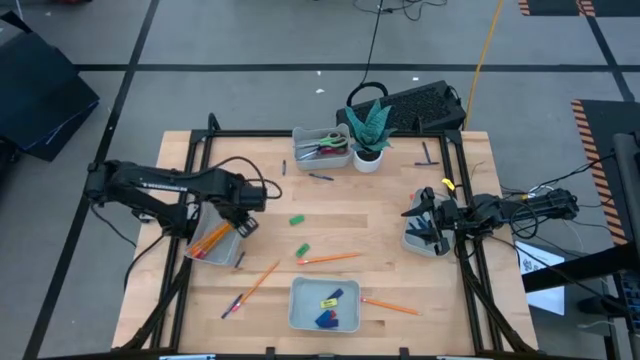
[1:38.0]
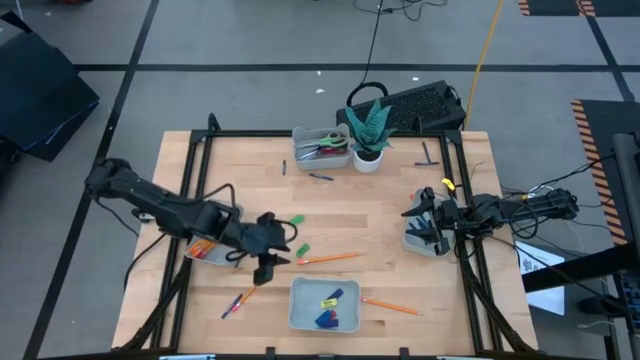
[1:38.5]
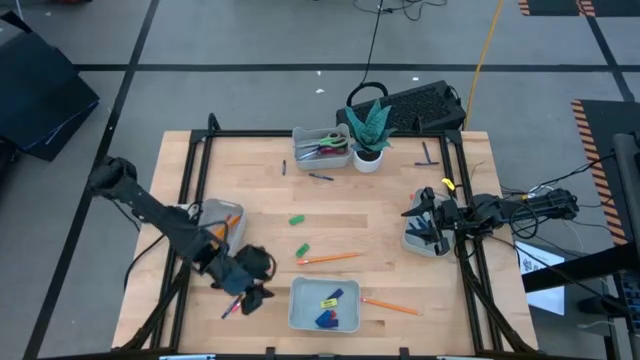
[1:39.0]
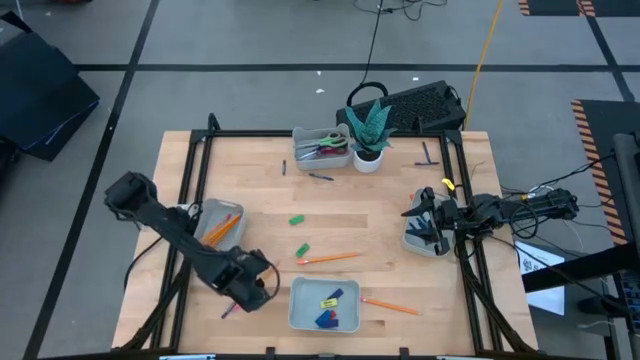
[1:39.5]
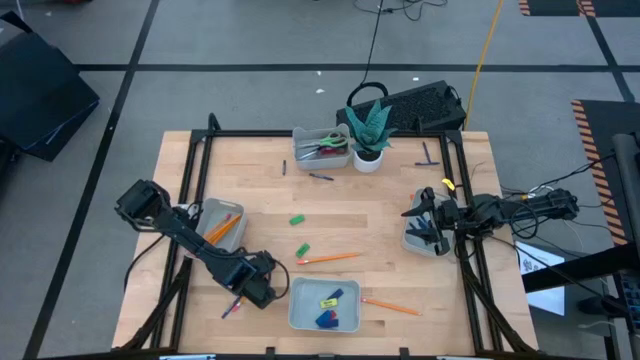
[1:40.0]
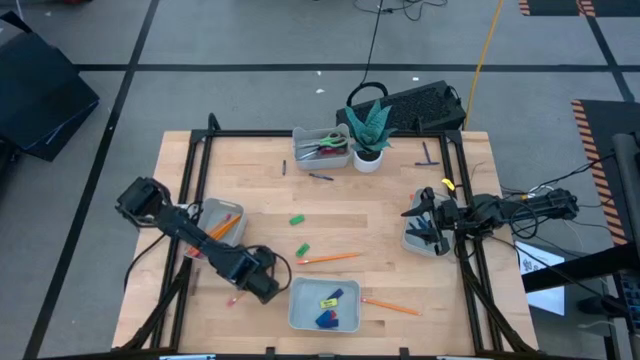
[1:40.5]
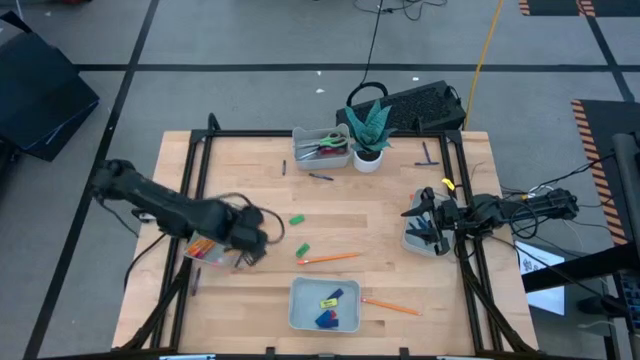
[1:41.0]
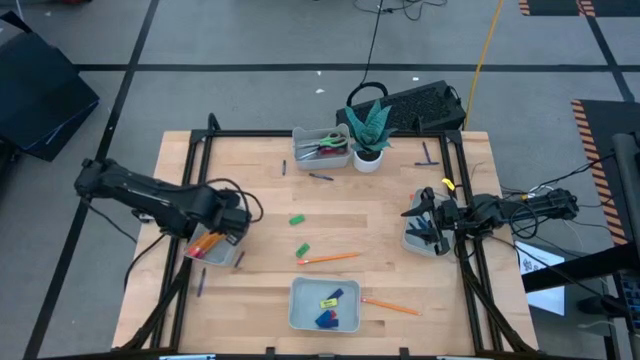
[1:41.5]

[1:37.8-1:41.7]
Task: Sort crayons/erasers/pens/pencils in bins
Put the orange pencil into the middle left gray bin

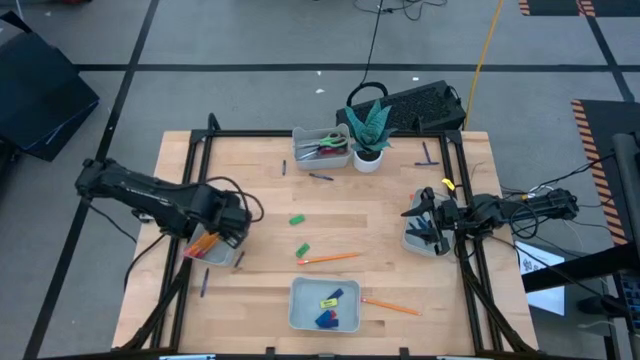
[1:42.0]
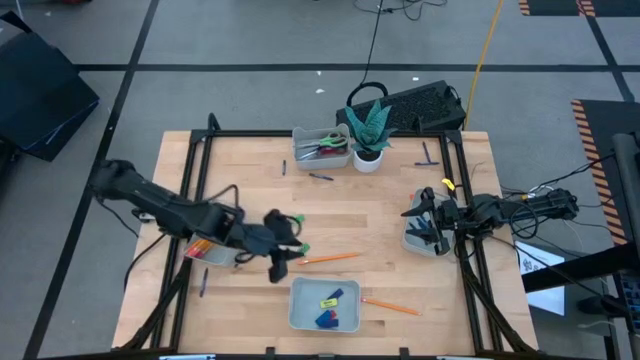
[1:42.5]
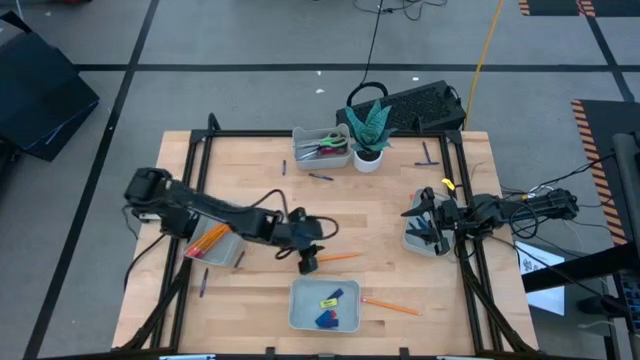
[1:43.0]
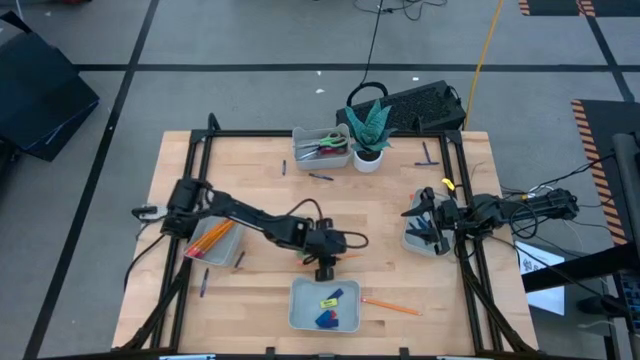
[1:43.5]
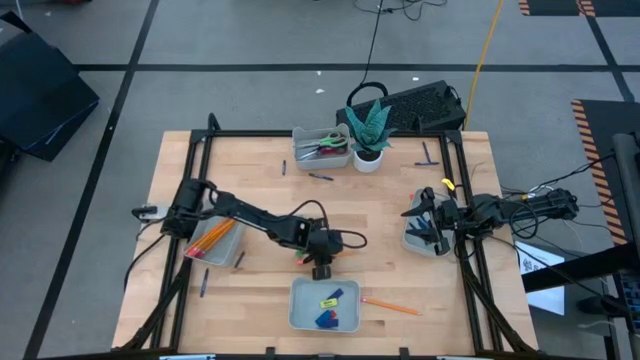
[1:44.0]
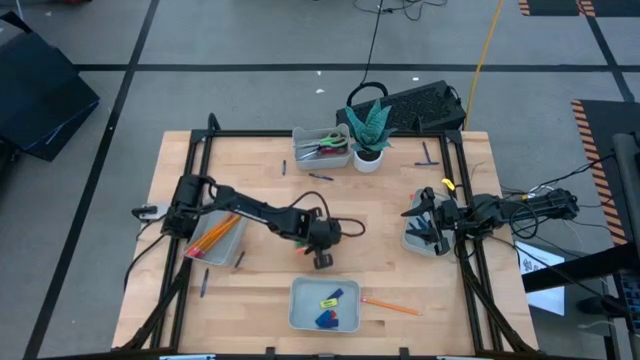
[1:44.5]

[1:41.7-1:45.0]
Put the orange pencil into the middle left gray bin

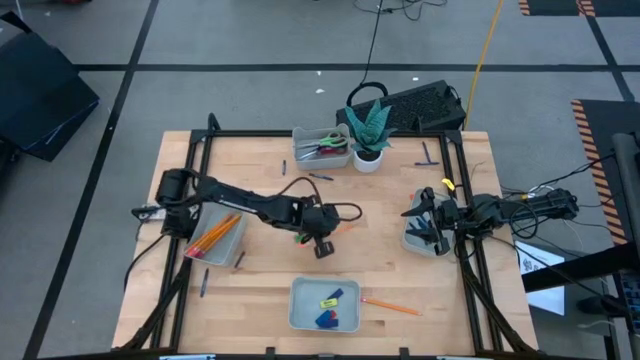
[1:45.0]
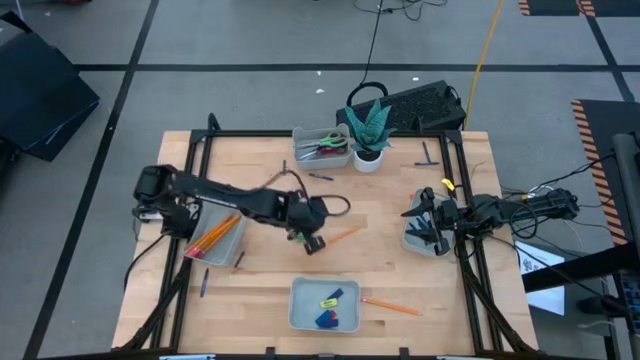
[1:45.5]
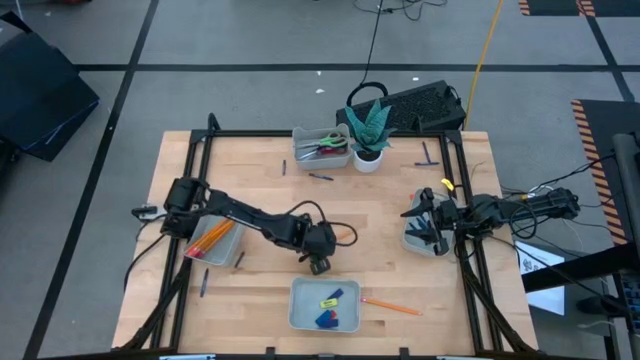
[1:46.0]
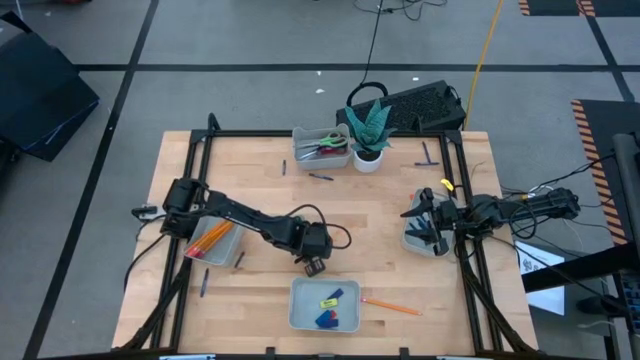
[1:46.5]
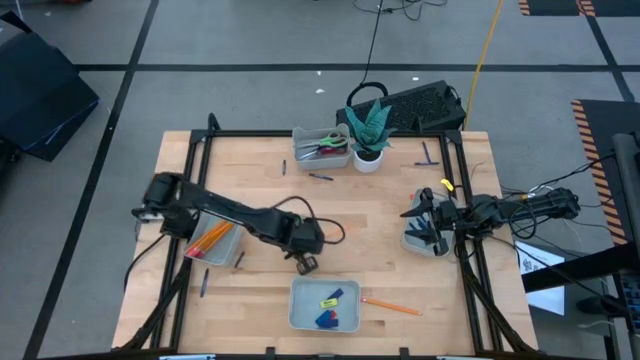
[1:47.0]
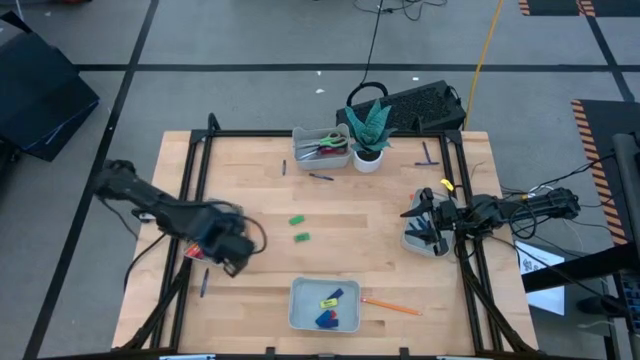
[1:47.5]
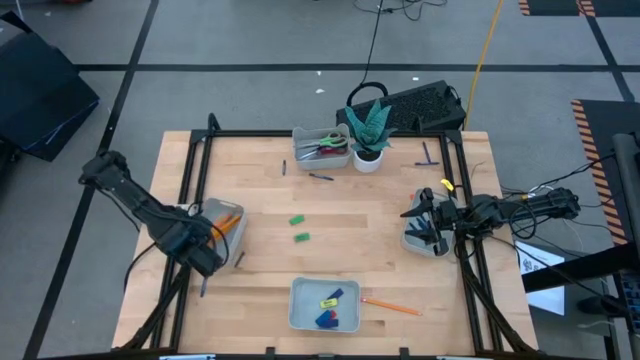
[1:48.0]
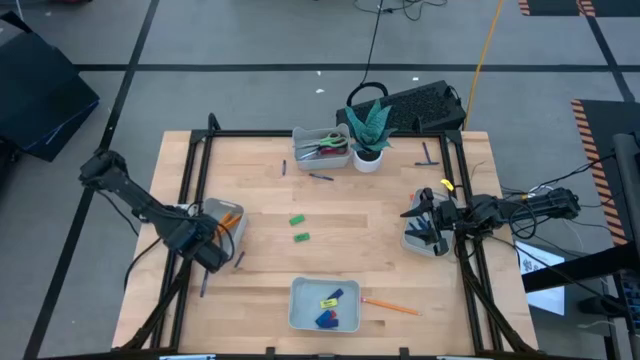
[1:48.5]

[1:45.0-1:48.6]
Put the orange pencil into the middle left gray bin

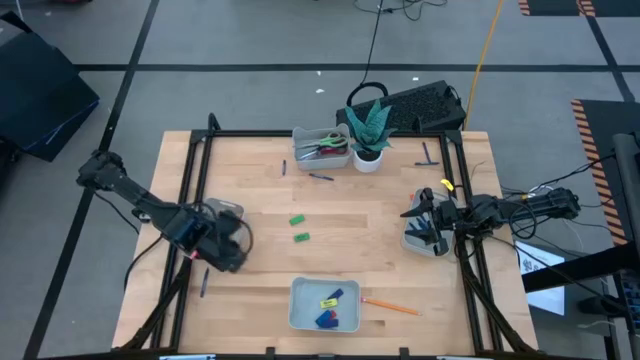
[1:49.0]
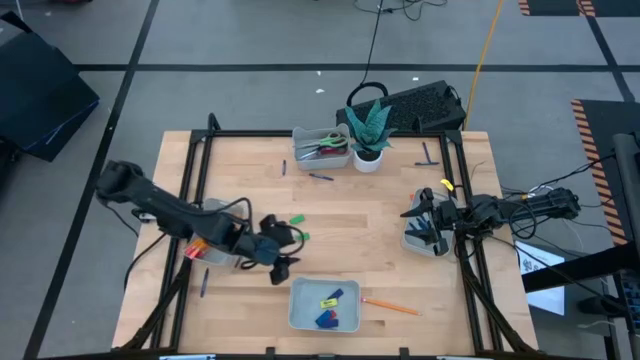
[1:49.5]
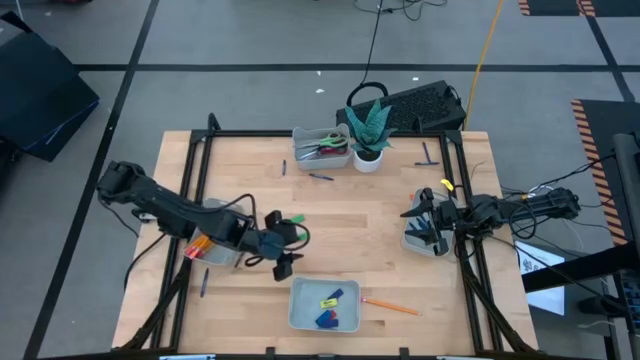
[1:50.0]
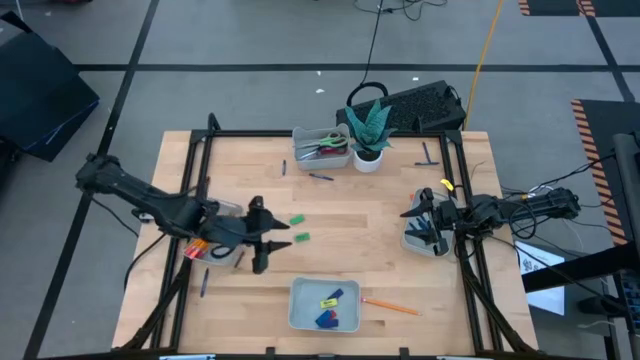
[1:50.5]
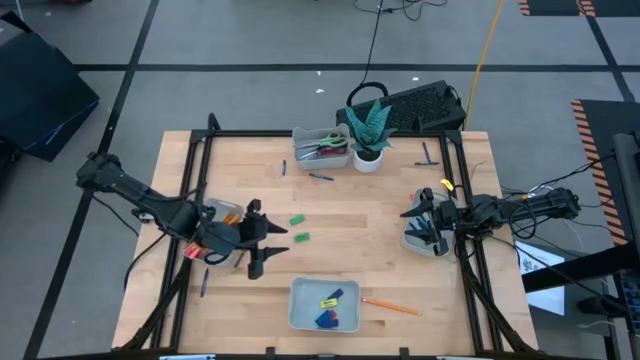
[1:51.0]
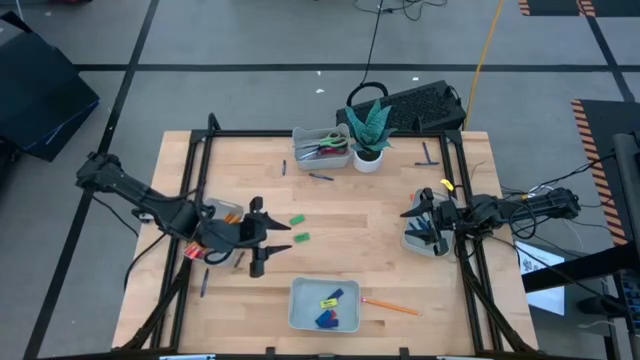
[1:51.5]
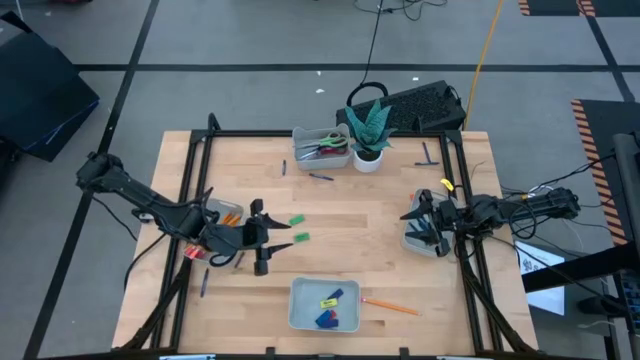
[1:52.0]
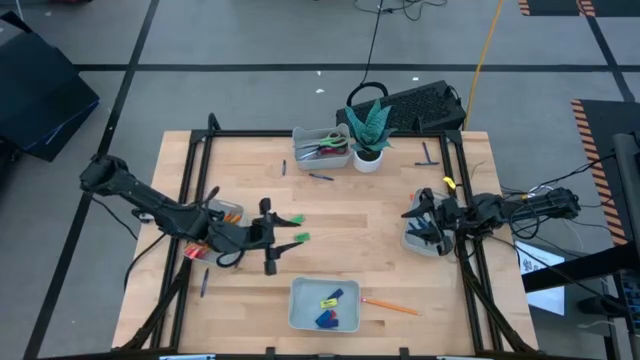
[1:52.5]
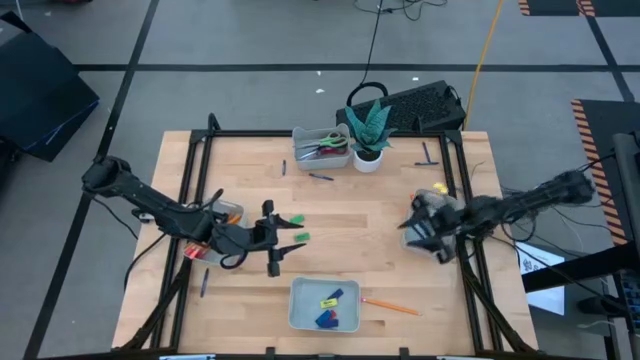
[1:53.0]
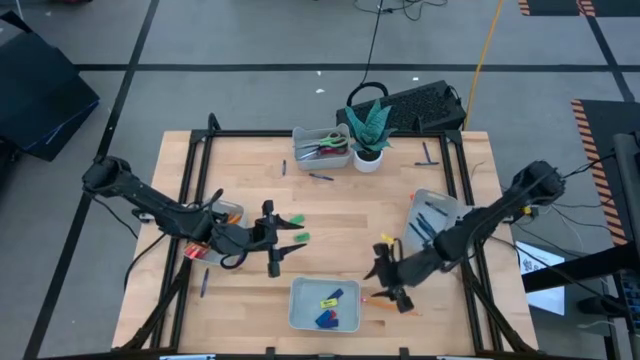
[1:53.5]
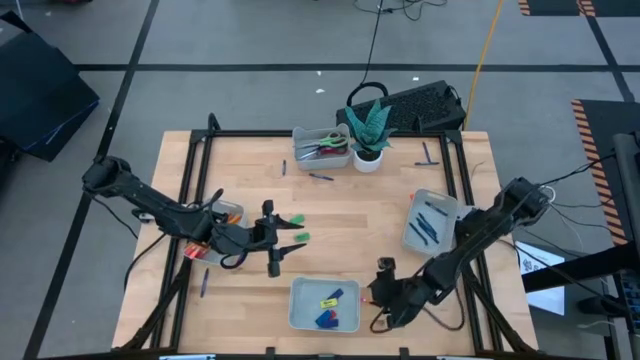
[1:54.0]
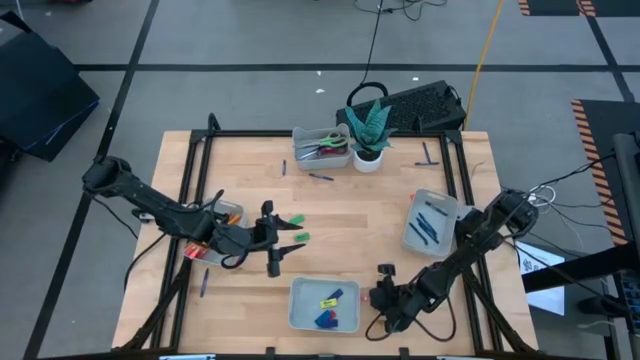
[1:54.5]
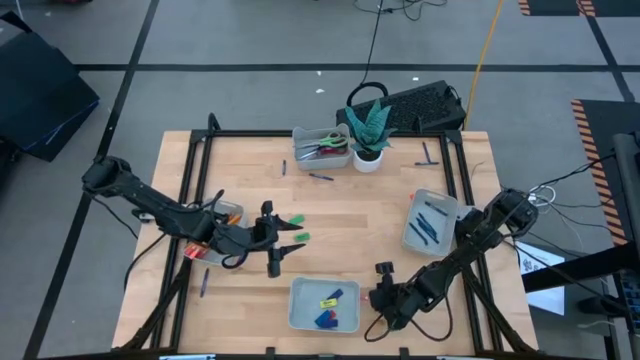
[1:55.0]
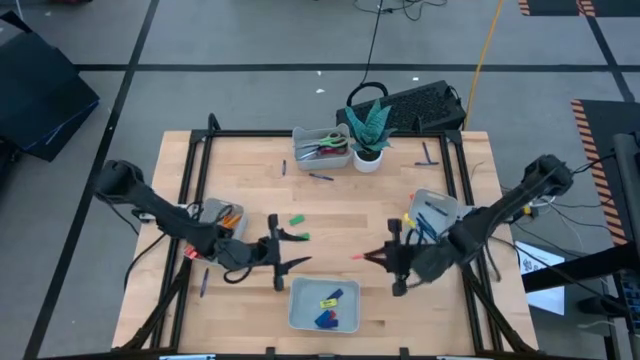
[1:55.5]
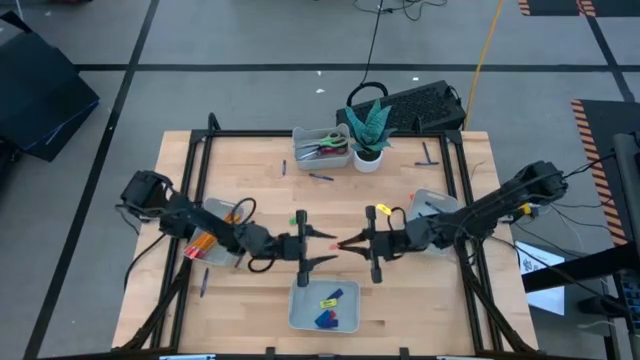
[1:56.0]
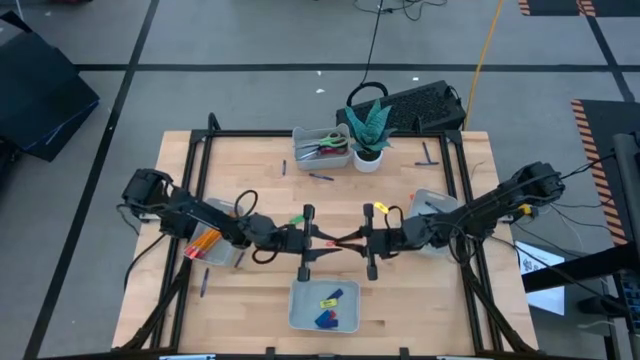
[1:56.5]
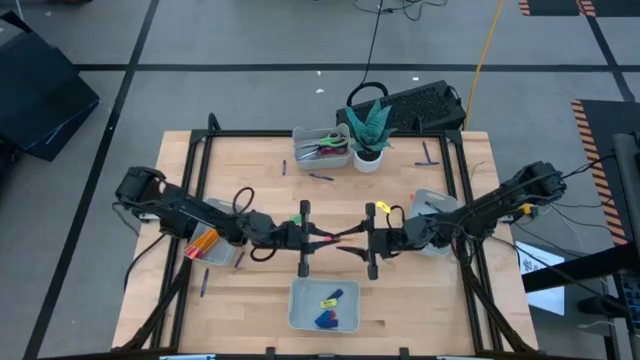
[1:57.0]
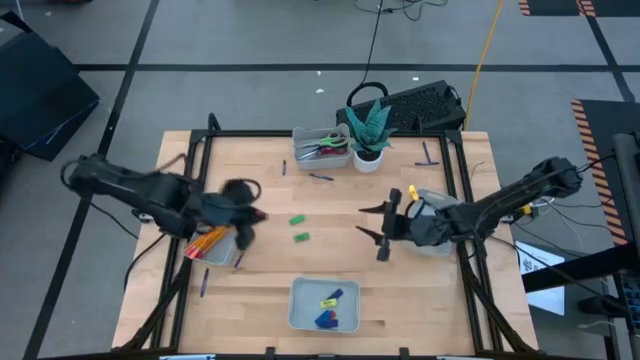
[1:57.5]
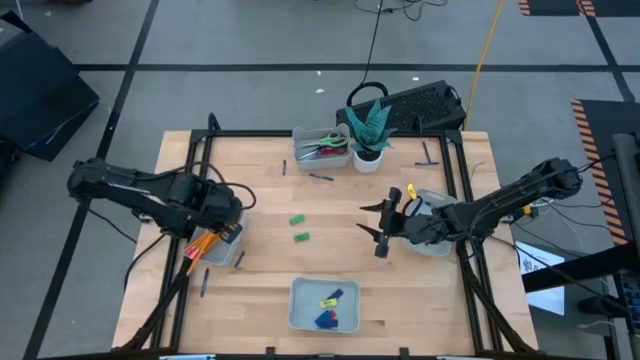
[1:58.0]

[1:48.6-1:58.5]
Put the orange pencil into the middle left gray bin

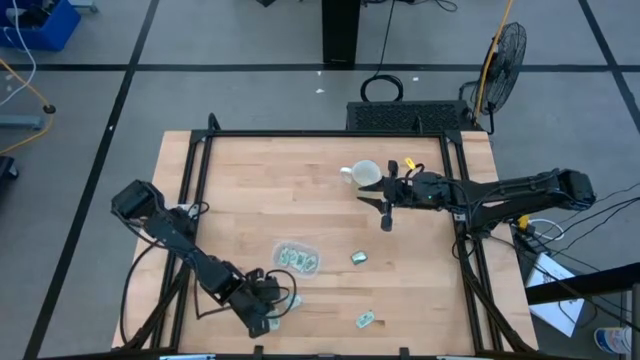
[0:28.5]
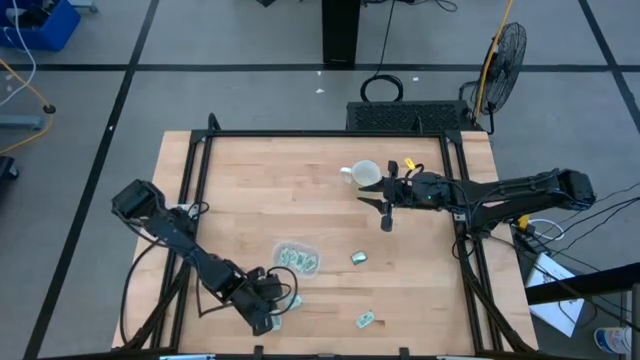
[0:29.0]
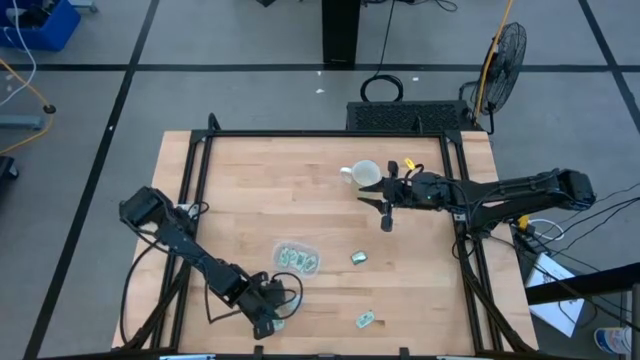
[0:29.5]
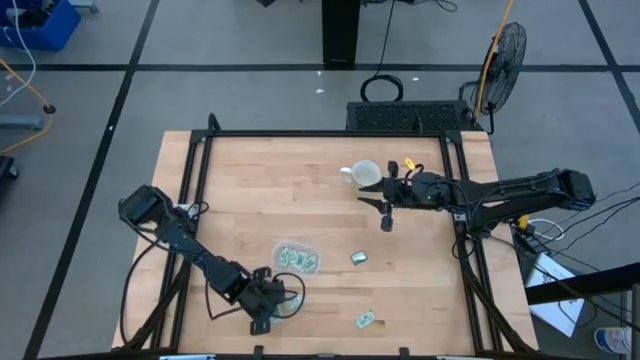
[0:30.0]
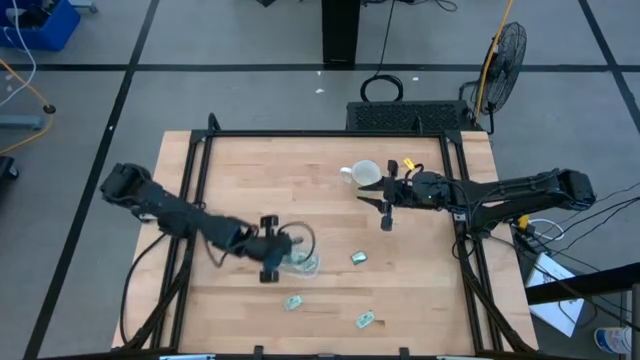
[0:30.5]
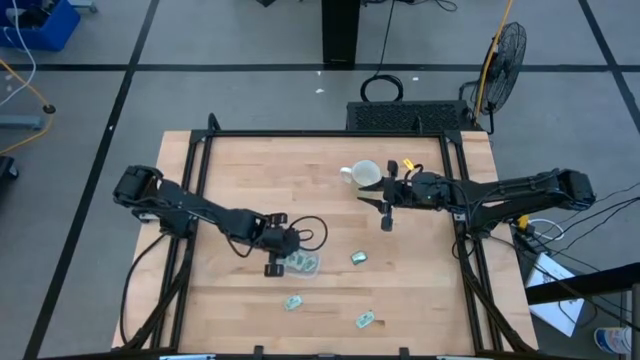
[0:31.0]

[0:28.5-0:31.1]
Task: Pick and place Stevia / Truvia into bins
Put the light green stevia packet into the transparent bin
